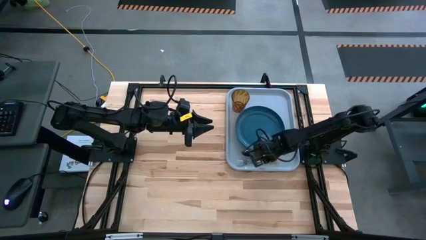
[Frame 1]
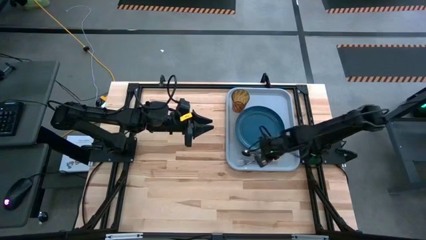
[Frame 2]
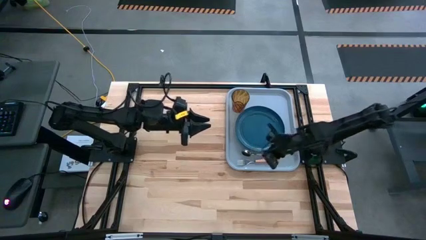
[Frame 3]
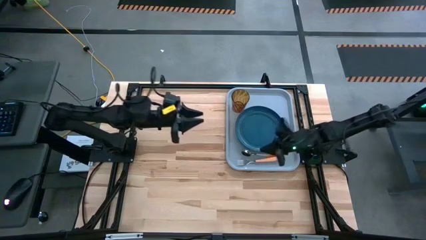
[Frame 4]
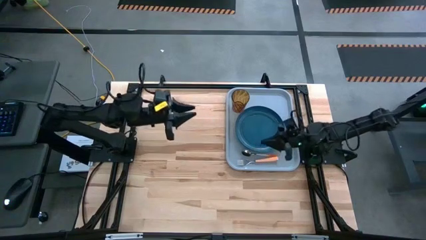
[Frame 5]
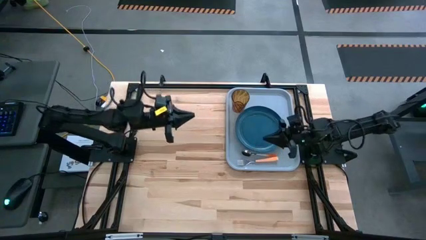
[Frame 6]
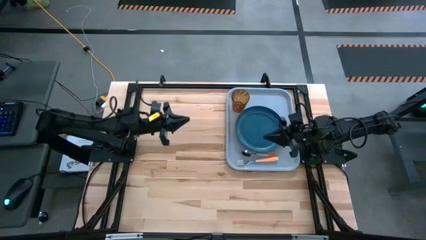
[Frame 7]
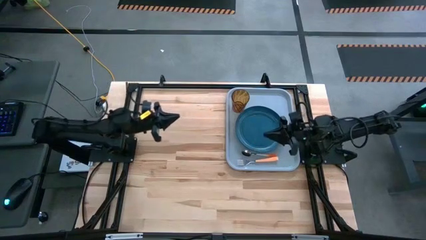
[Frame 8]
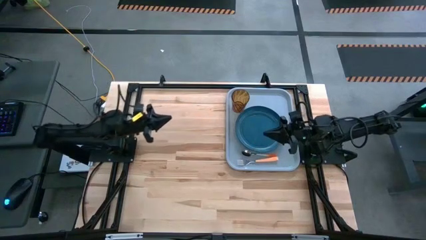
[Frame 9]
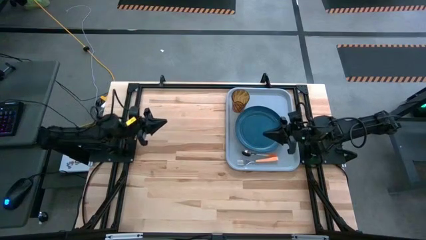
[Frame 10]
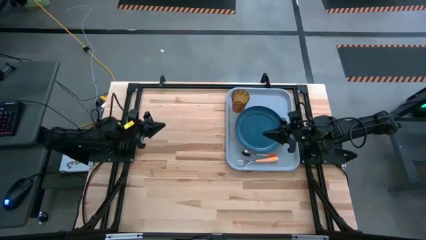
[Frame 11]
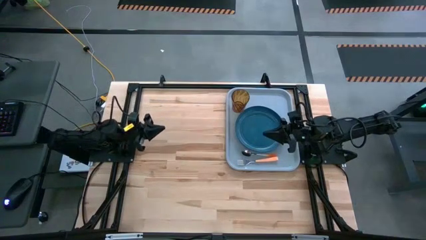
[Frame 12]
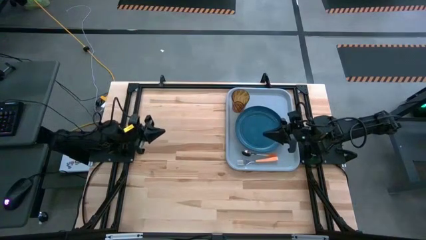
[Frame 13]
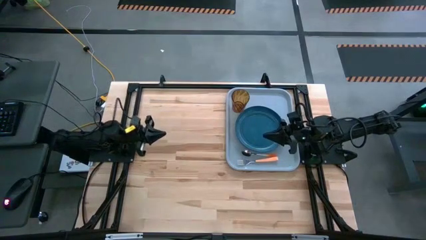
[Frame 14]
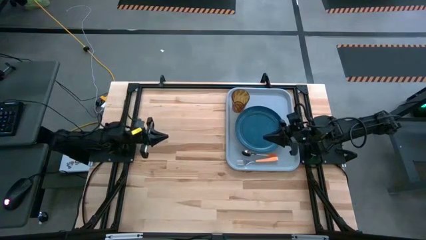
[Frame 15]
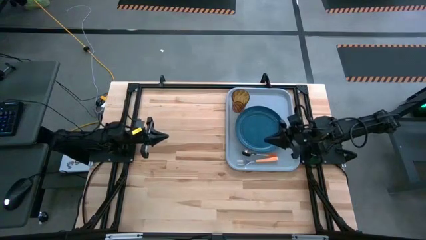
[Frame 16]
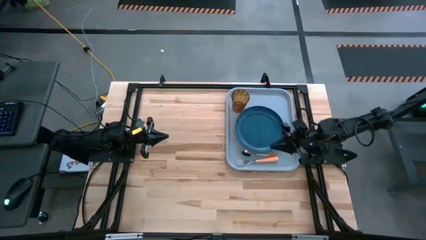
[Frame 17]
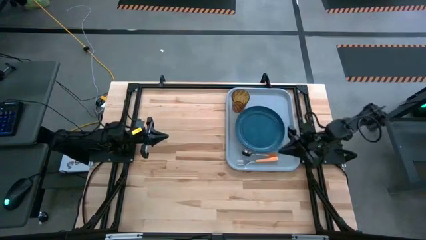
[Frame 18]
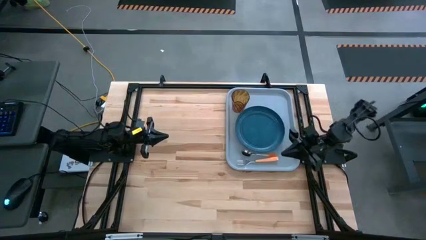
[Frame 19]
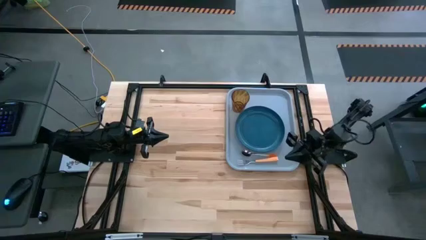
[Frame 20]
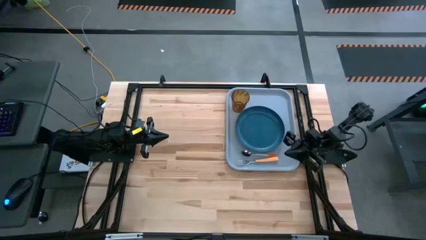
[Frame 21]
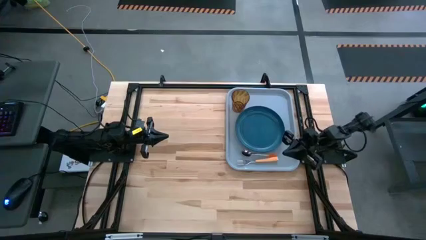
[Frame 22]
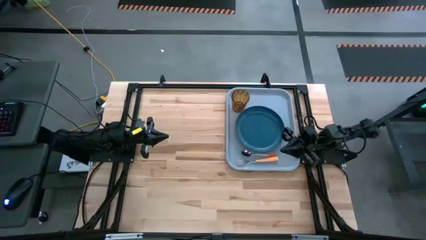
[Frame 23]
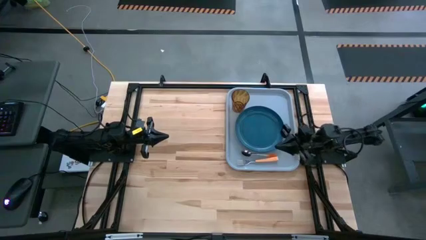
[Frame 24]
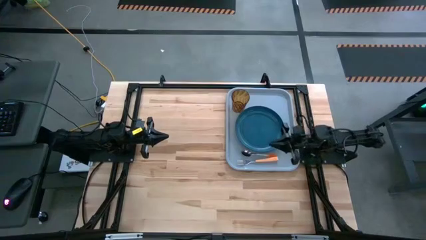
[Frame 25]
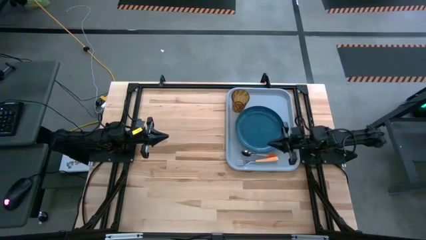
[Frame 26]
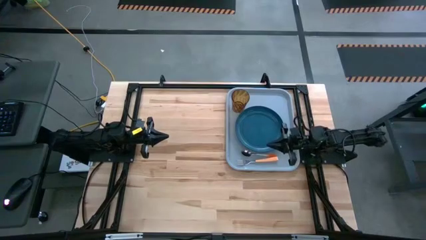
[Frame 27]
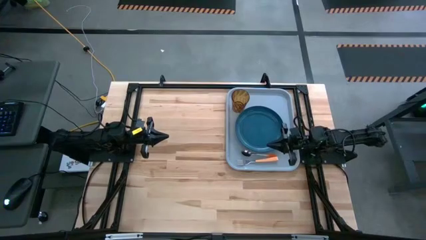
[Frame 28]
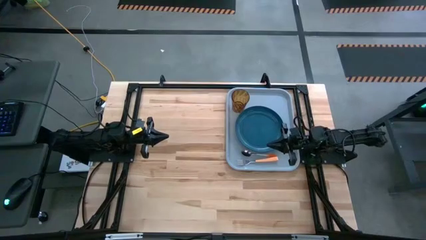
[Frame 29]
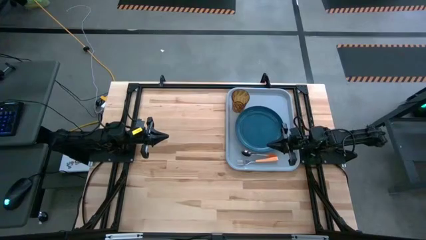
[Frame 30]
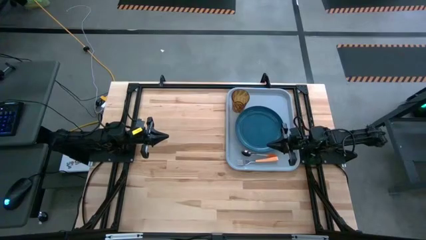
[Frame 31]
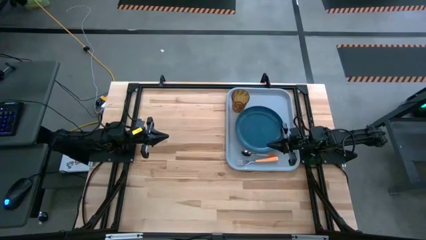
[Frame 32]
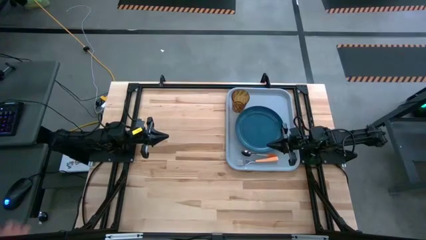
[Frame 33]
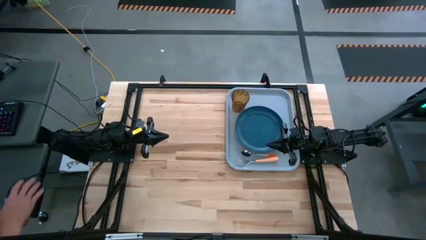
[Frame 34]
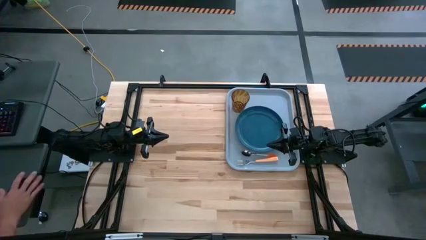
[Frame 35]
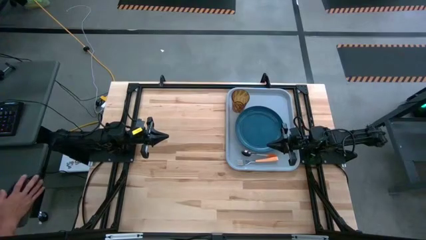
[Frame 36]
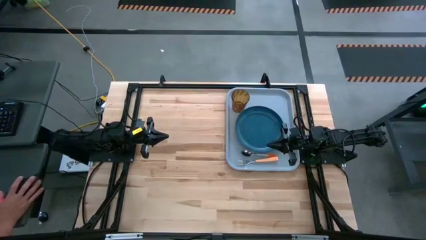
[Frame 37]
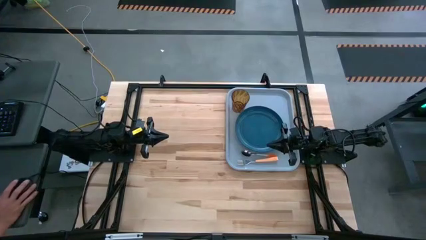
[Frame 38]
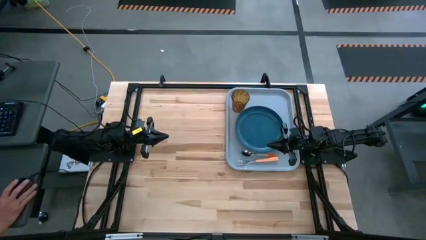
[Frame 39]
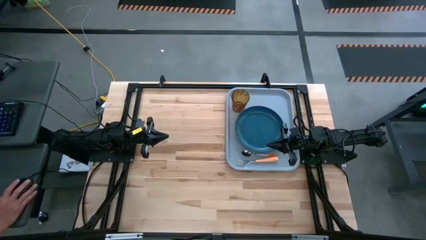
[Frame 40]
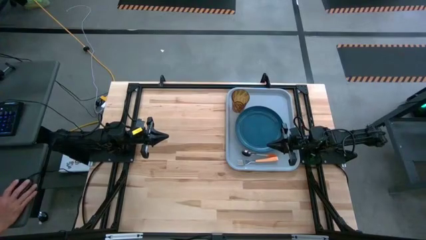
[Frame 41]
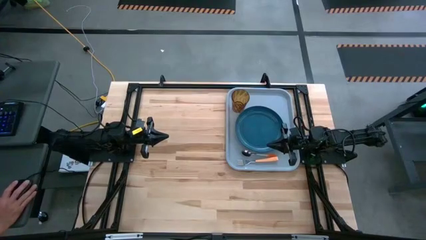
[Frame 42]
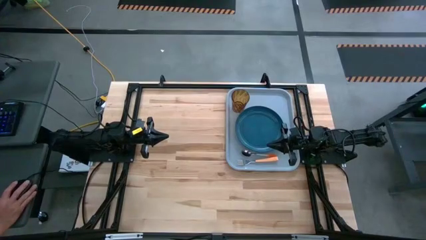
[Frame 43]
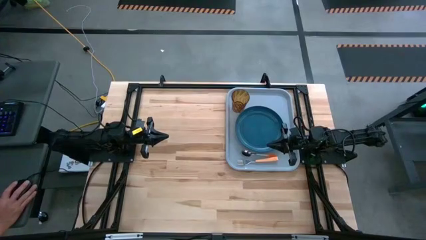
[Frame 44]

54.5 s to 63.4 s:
Task: Pick and place plate/cup/fork/spoon on tray
Return to Home Position

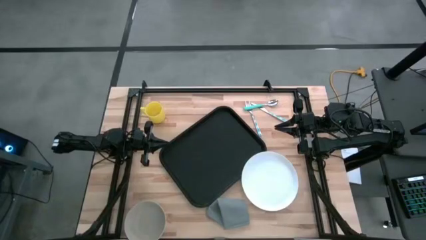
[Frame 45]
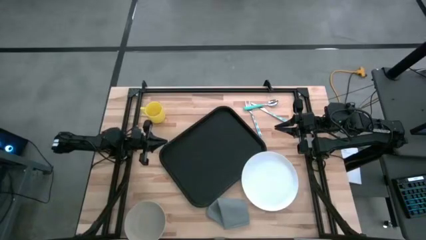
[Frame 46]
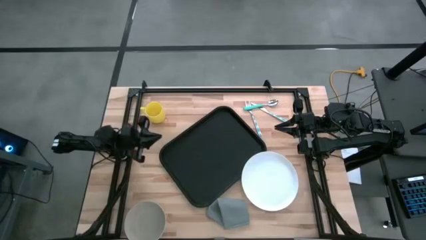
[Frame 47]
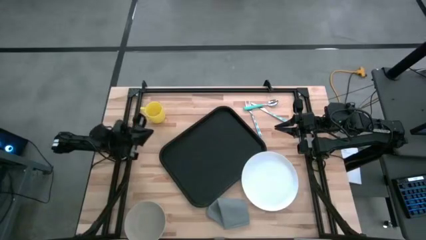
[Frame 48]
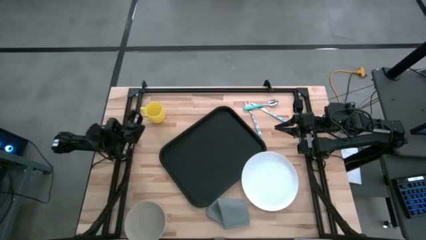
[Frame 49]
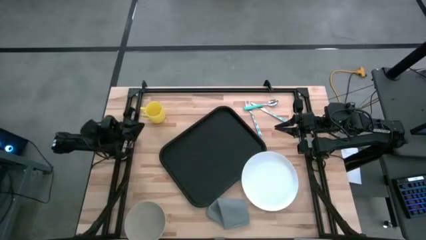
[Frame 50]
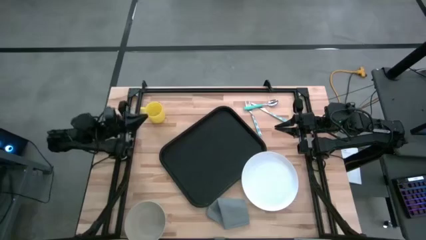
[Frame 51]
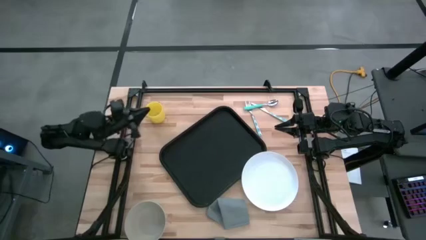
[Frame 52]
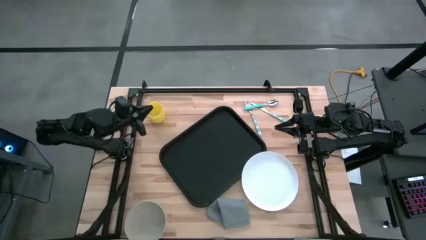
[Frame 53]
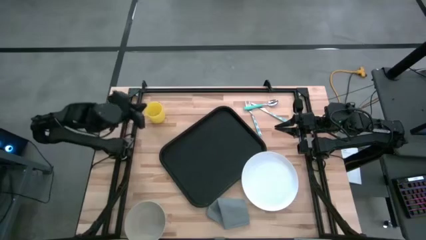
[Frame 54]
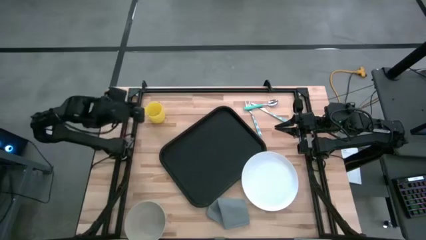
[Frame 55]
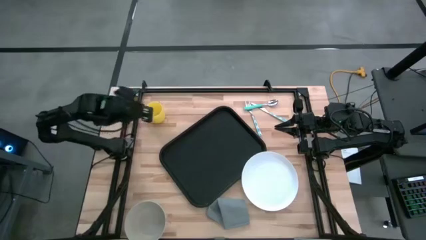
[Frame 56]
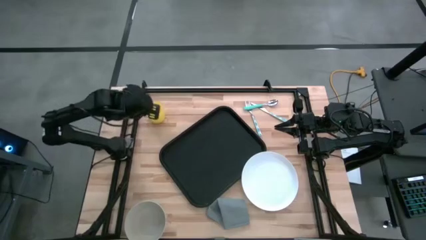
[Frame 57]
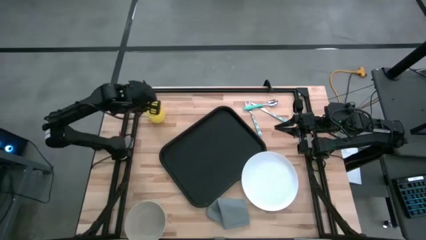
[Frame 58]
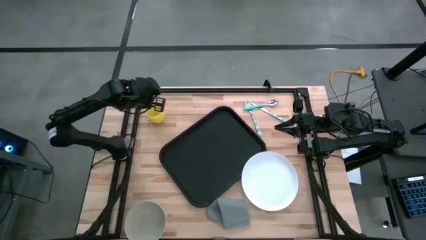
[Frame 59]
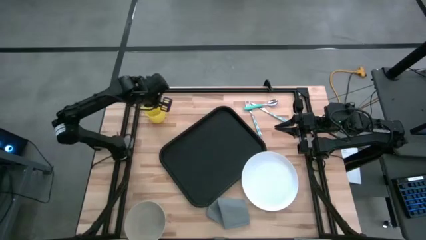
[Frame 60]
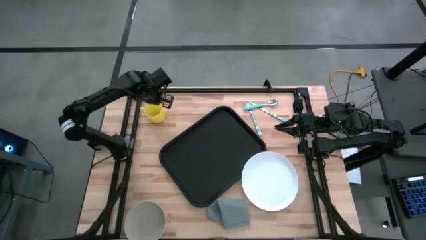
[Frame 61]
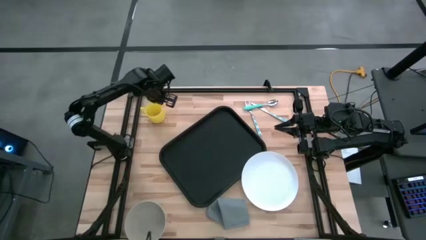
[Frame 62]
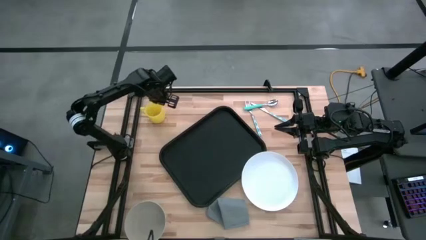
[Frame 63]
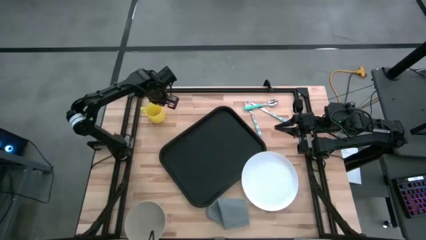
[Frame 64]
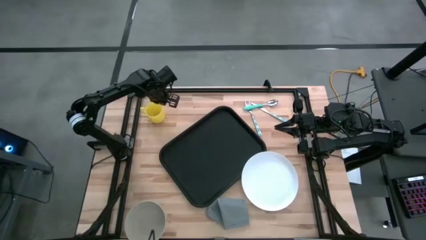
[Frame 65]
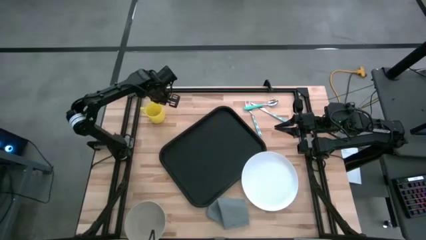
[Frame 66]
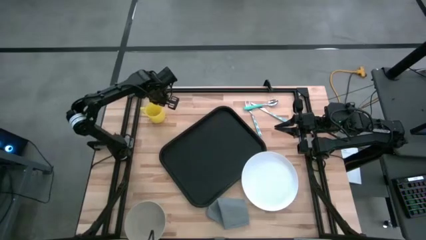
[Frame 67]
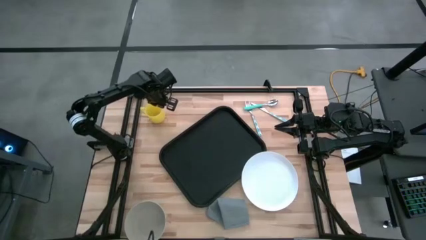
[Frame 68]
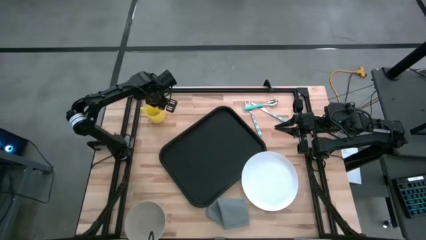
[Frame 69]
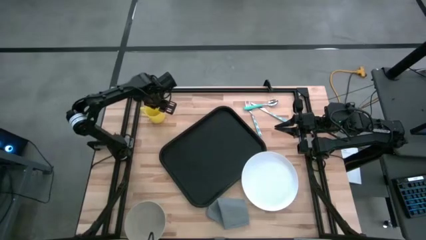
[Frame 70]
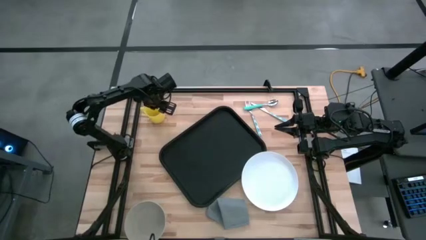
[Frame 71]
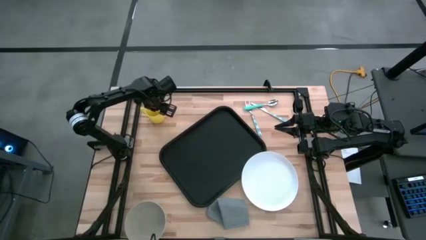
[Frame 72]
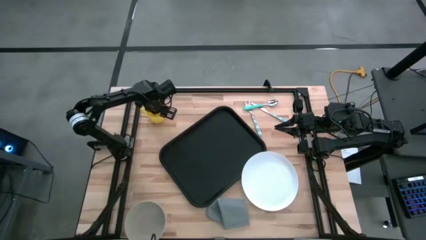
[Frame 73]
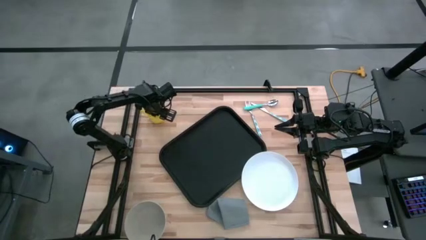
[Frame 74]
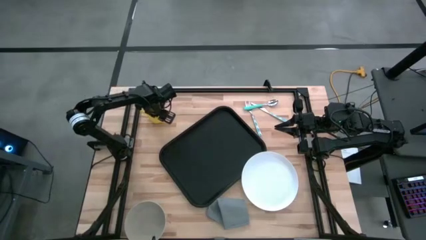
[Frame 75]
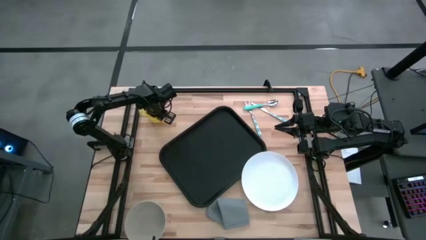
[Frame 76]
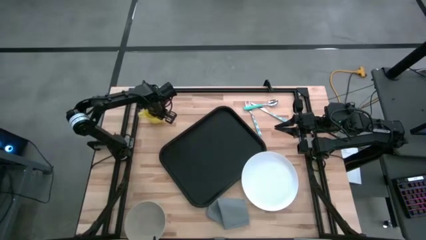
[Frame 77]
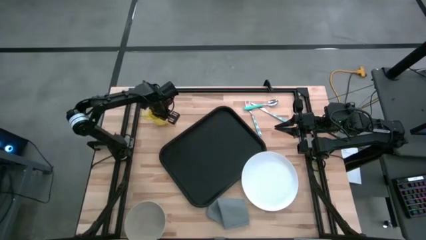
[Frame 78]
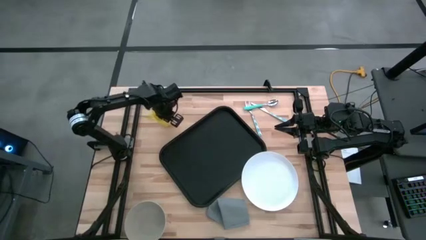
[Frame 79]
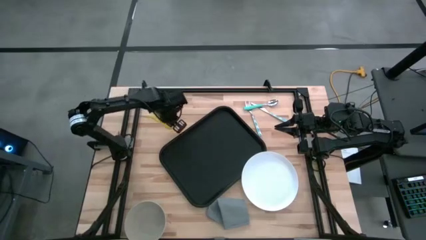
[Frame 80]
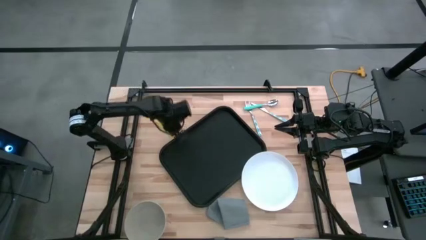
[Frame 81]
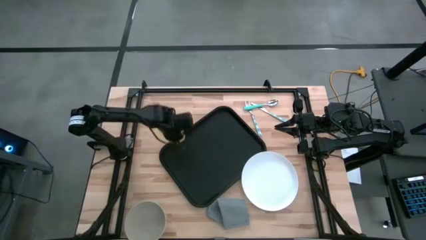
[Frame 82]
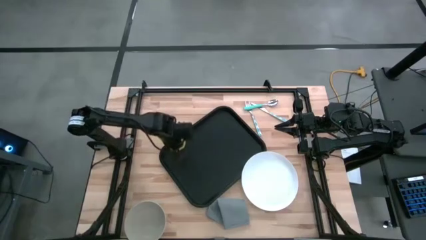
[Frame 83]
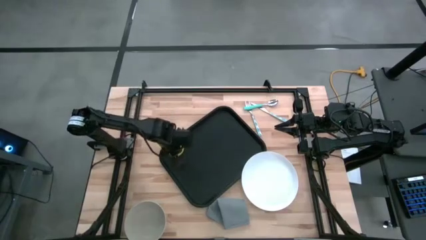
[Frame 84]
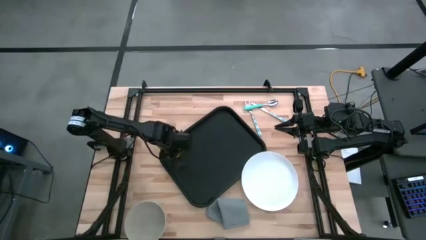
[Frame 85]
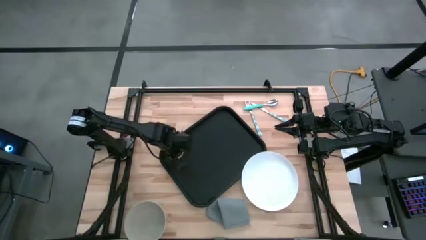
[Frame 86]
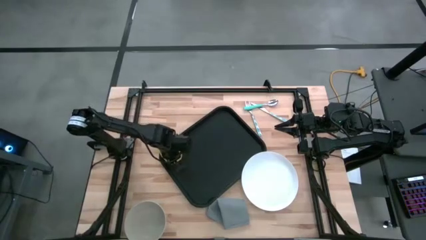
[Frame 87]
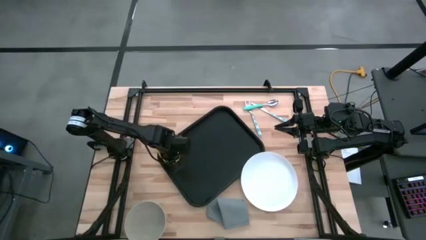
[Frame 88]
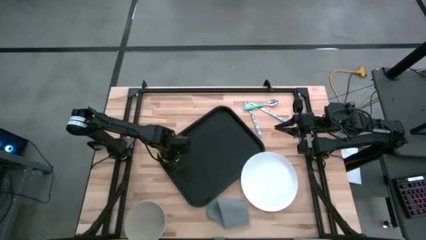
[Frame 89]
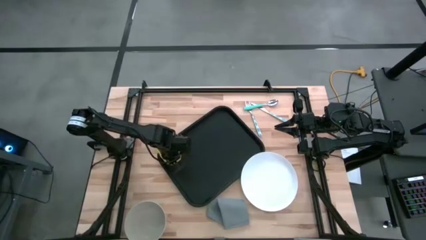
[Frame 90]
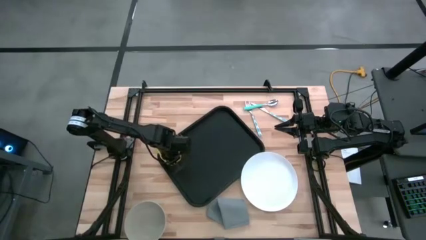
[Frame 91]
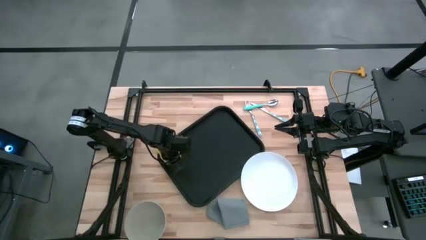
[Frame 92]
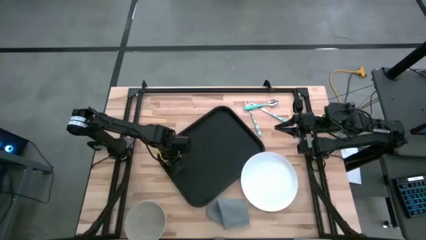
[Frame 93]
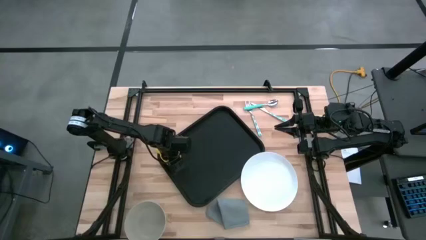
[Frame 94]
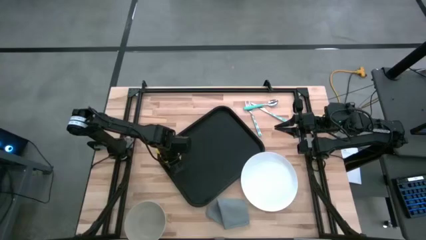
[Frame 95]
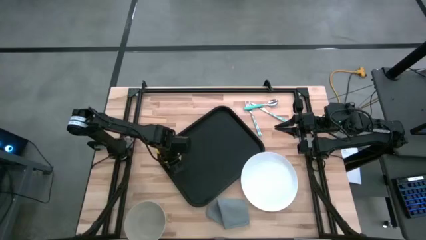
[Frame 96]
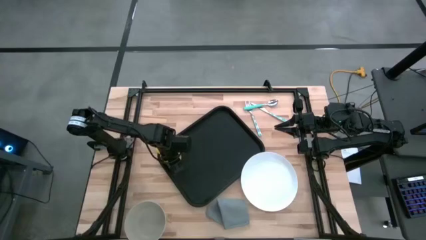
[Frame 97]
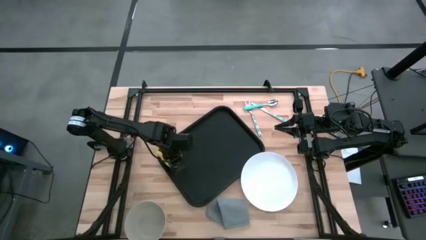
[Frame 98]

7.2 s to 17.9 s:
Task: Set up tray
Put the yellow mug on the black tray
